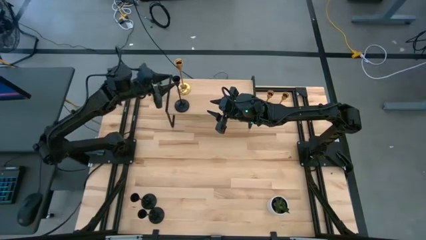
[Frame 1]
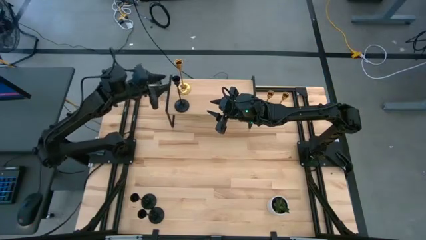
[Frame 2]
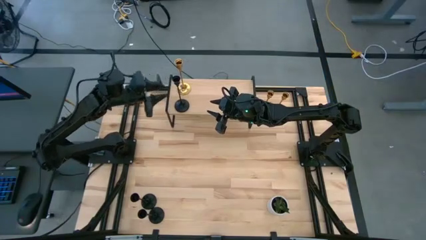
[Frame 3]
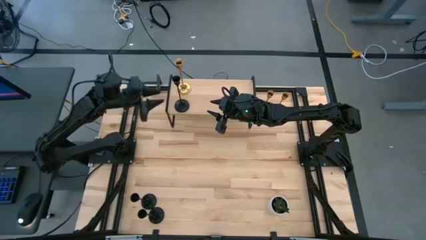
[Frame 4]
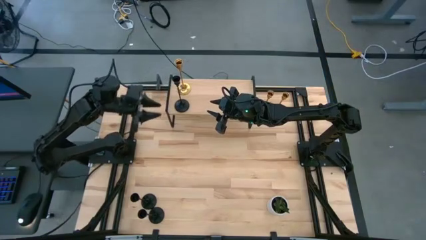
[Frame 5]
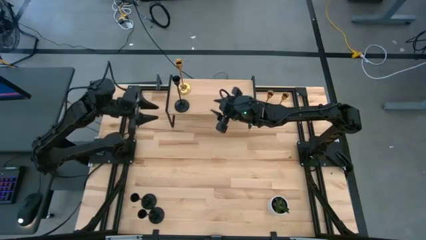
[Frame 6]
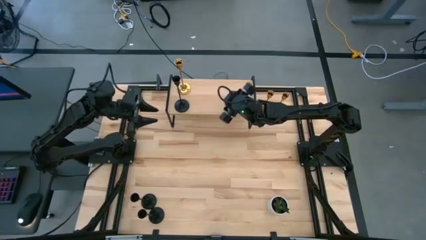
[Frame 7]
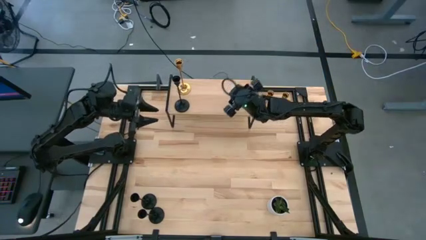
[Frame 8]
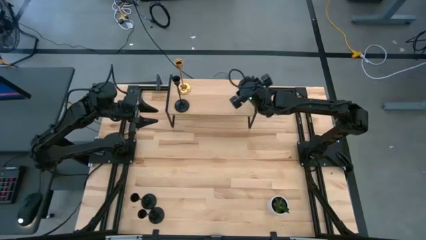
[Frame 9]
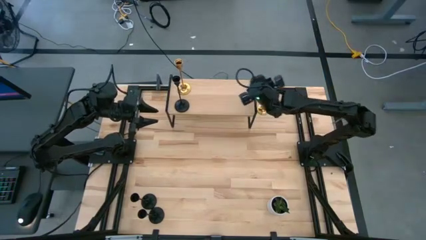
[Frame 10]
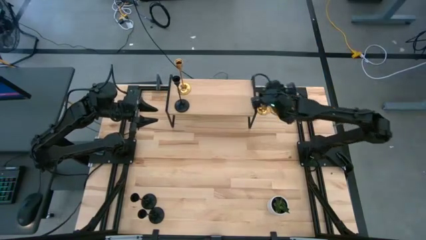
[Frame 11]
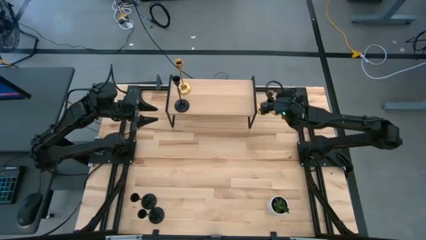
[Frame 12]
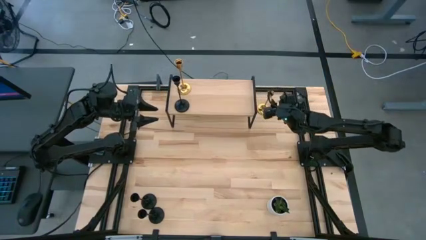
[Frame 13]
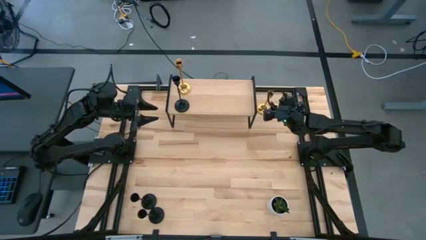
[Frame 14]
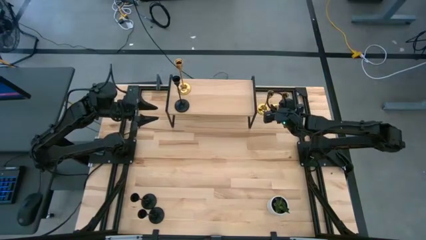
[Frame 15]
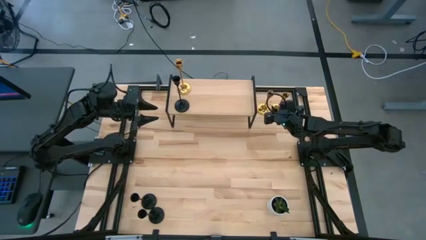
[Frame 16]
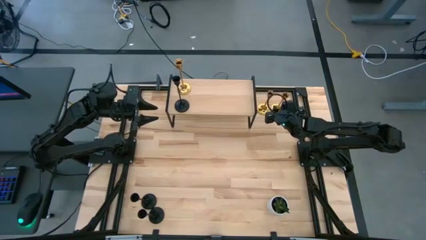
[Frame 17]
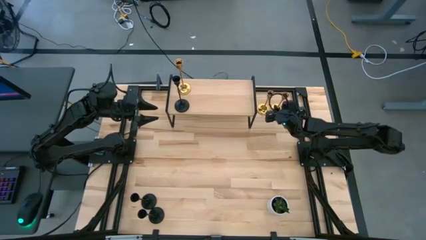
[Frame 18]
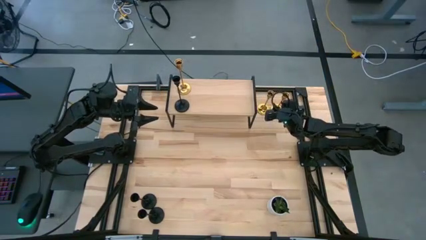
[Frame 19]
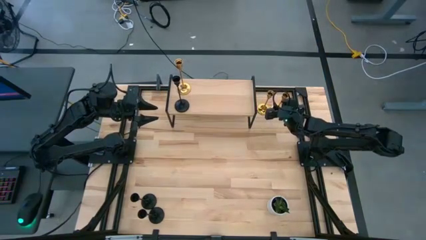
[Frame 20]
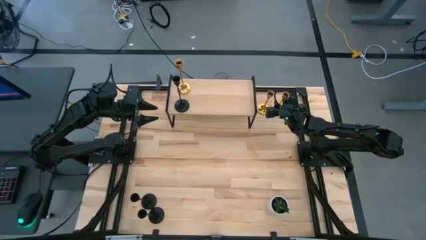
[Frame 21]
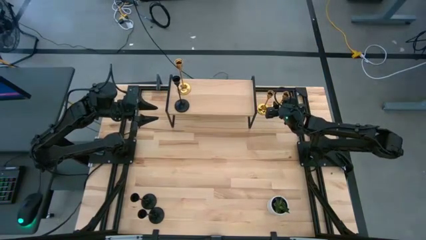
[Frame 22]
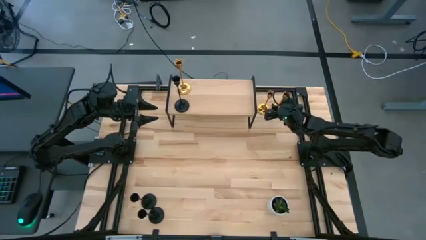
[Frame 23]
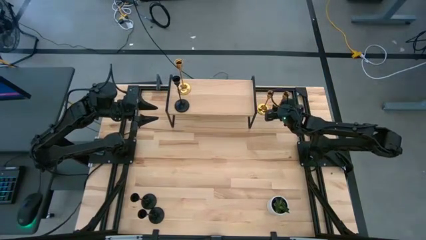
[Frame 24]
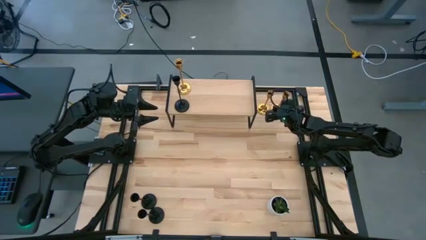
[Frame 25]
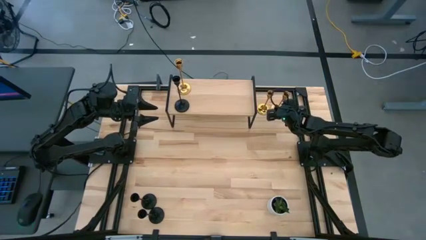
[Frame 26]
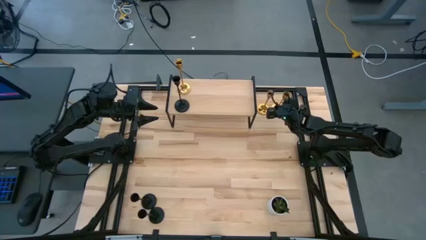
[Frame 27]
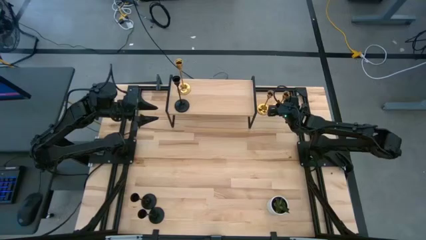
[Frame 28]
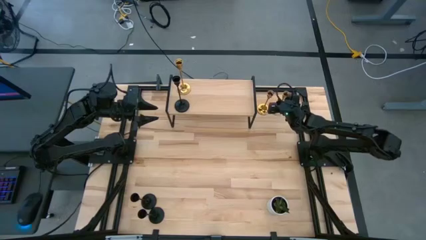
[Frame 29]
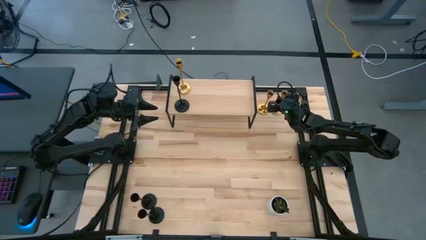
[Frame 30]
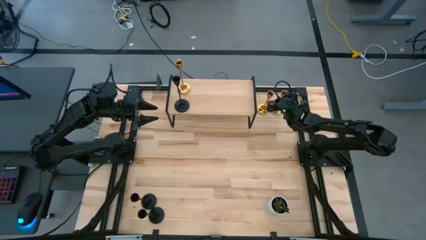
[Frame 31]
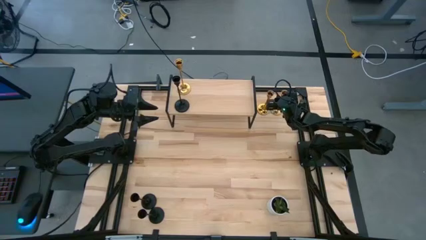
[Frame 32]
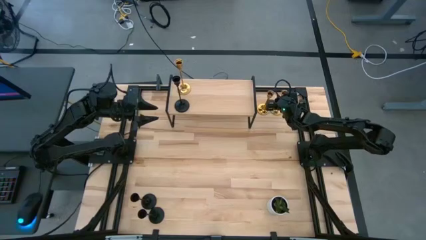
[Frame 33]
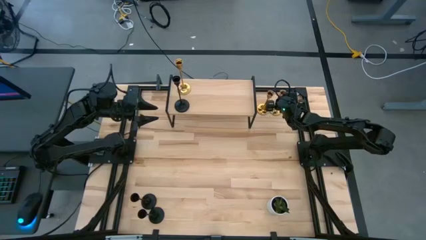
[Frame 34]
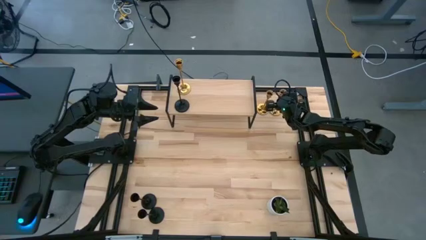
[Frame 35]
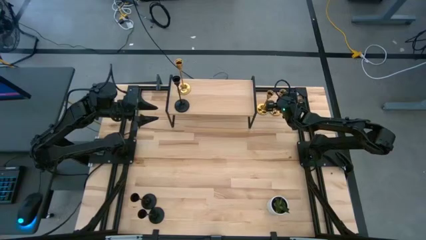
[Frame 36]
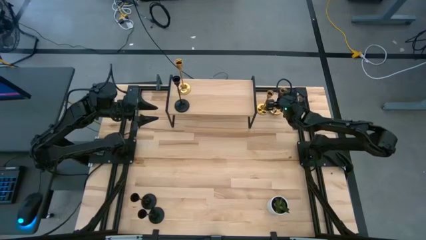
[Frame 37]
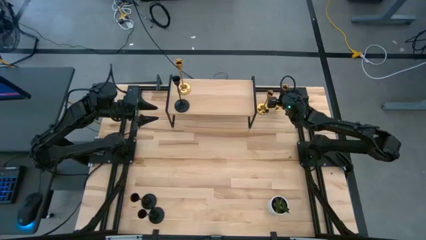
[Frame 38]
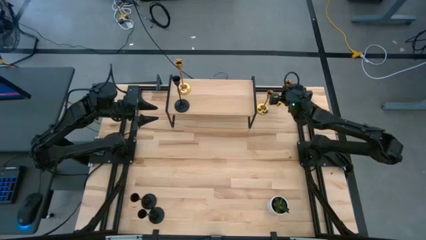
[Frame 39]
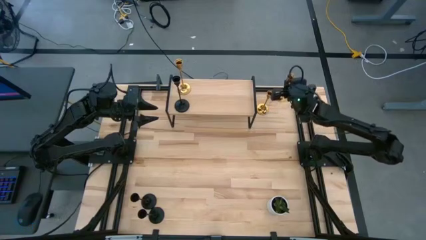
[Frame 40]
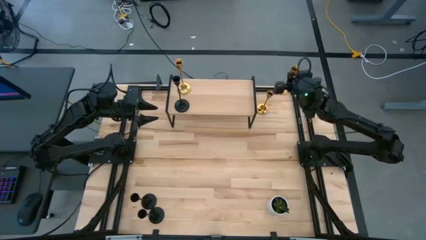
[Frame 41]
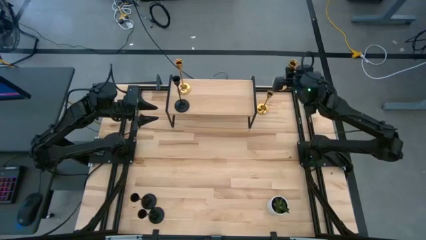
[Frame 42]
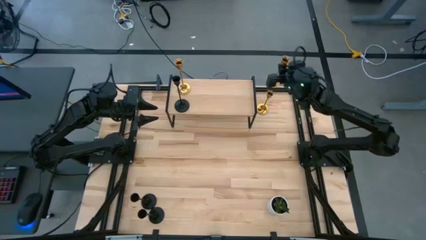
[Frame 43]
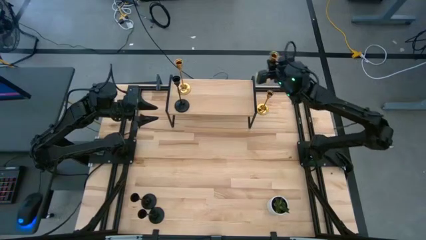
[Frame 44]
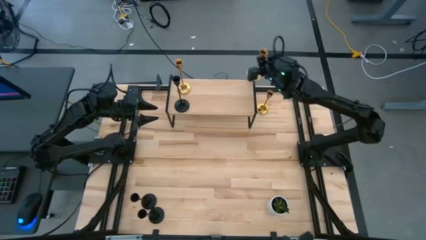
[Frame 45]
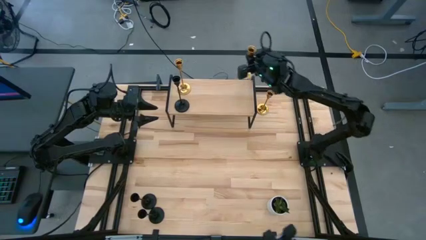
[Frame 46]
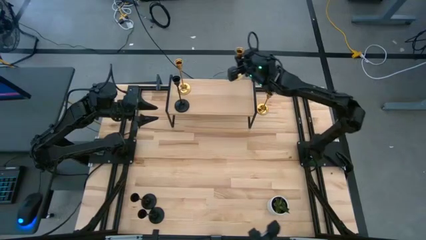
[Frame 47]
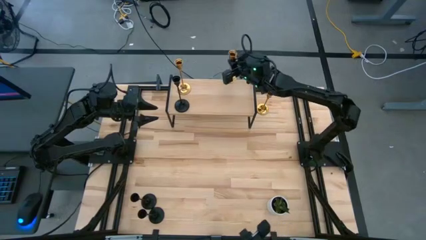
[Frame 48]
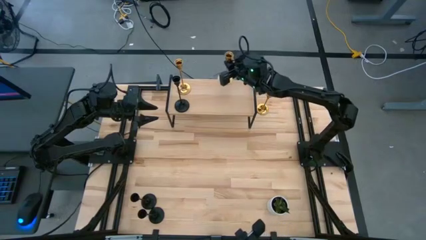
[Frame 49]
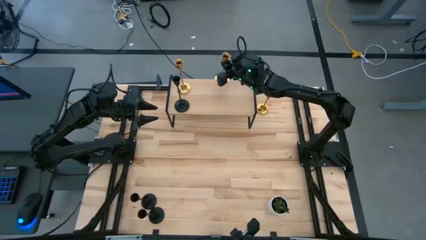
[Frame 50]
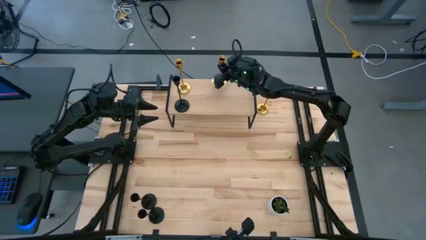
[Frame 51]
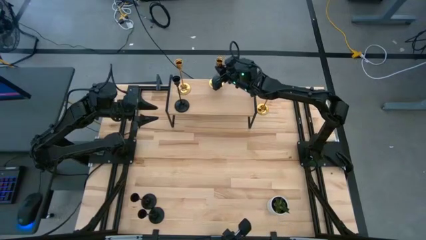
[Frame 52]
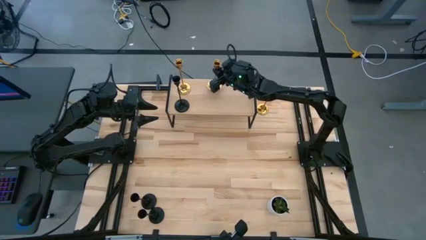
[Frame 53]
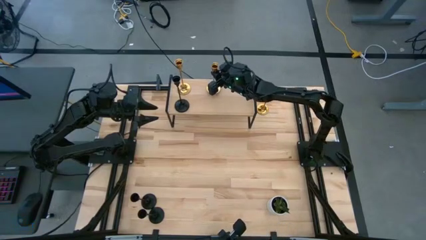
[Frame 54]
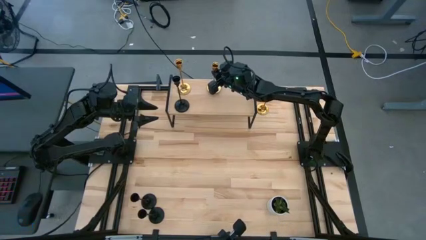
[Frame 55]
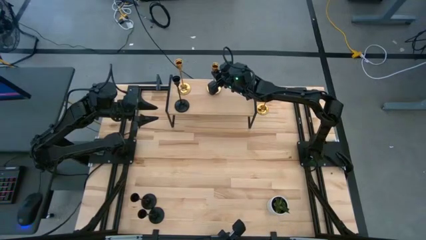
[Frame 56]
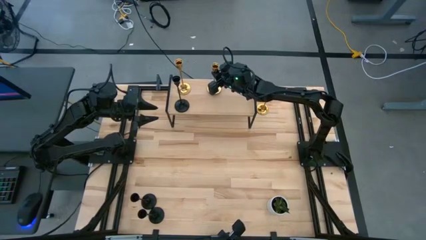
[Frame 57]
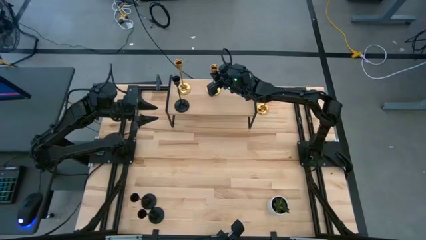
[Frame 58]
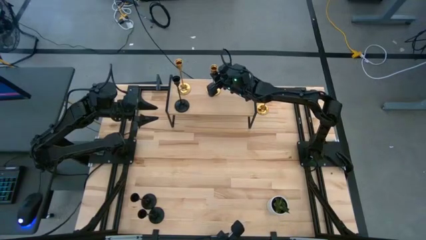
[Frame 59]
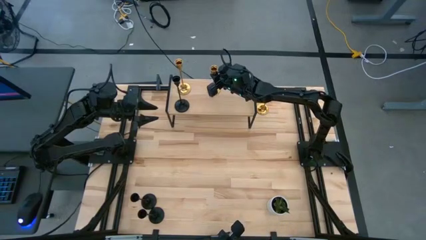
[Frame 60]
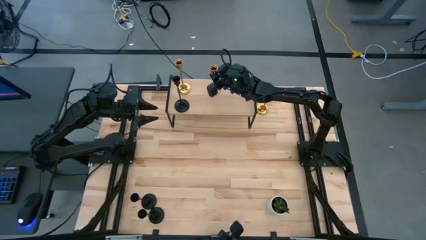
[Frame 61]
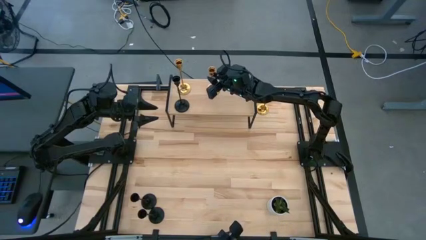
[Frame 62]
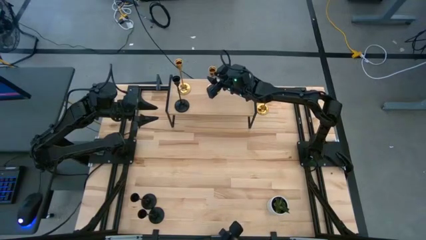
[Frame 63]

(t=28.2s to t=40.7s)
Task: Pick & Place candle stick holders
Put the right gold candle holder aligned with the other gold candle holder on the shelf
